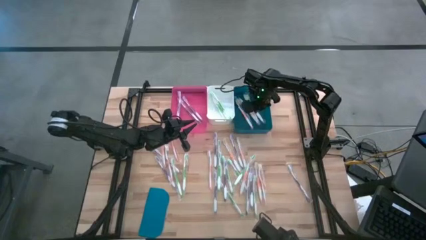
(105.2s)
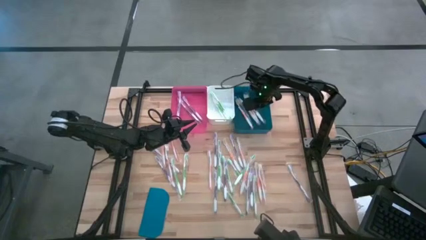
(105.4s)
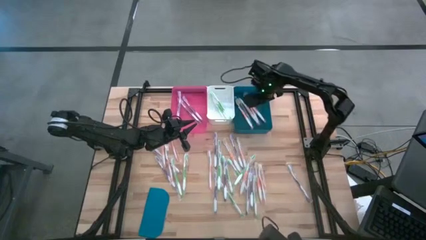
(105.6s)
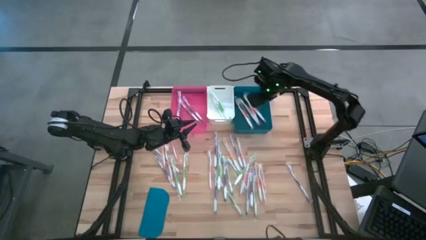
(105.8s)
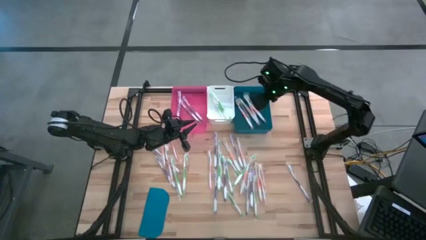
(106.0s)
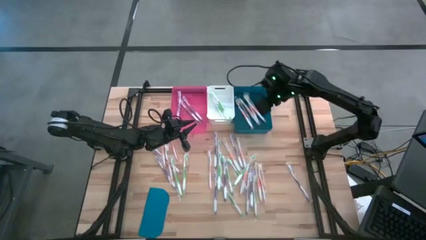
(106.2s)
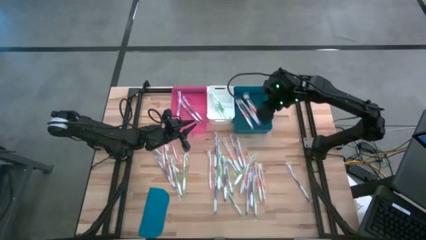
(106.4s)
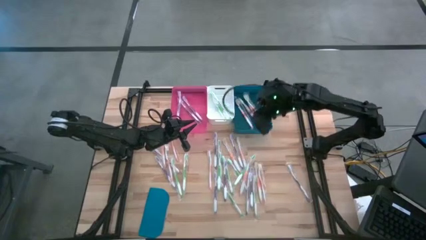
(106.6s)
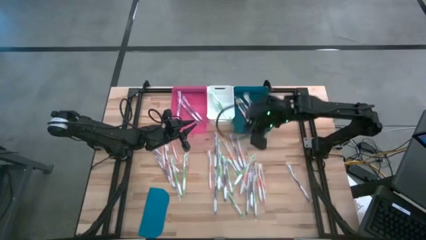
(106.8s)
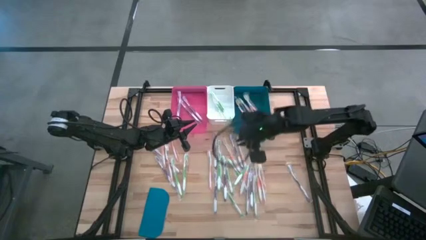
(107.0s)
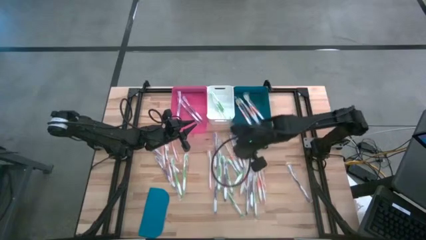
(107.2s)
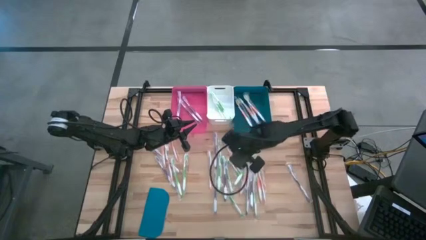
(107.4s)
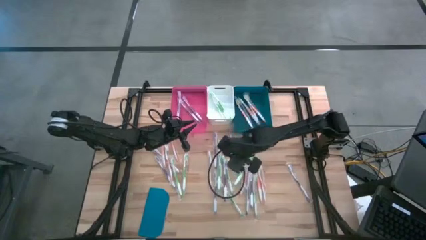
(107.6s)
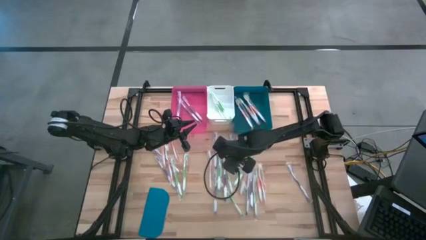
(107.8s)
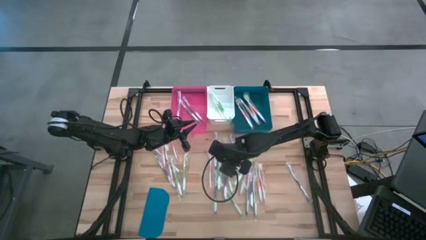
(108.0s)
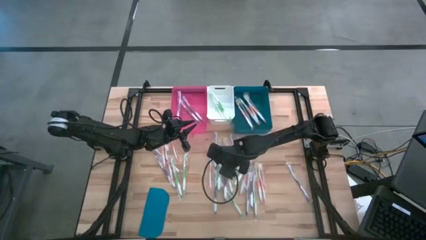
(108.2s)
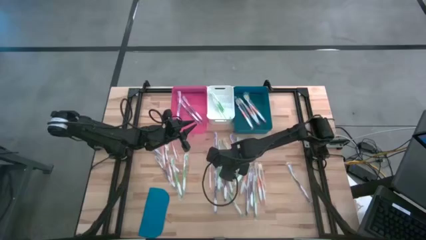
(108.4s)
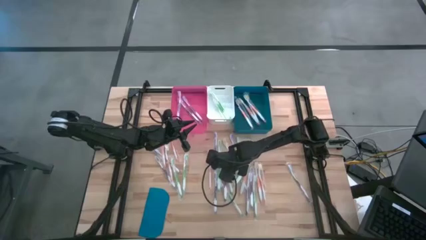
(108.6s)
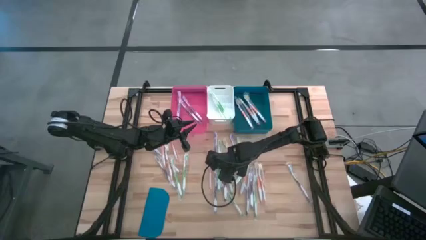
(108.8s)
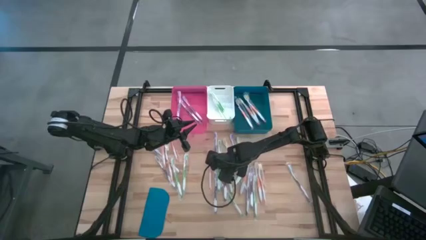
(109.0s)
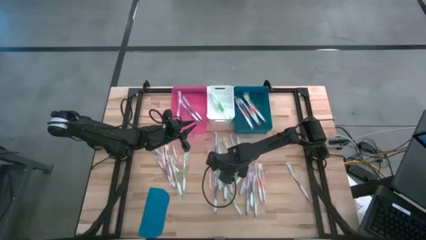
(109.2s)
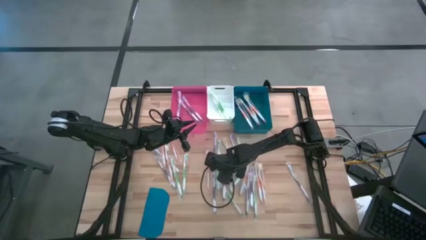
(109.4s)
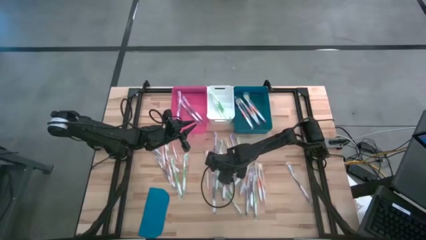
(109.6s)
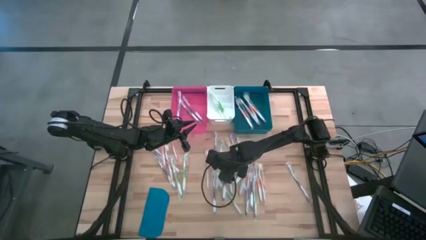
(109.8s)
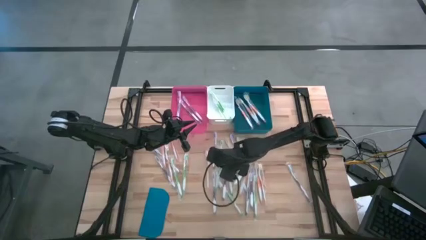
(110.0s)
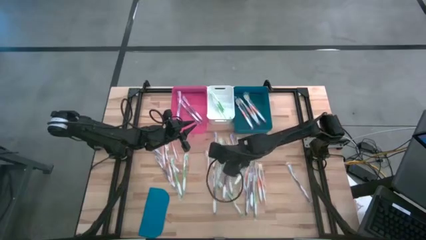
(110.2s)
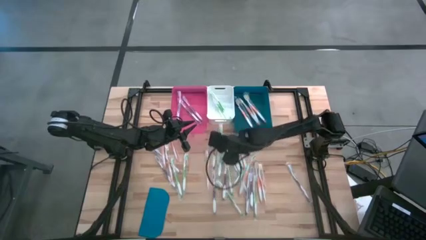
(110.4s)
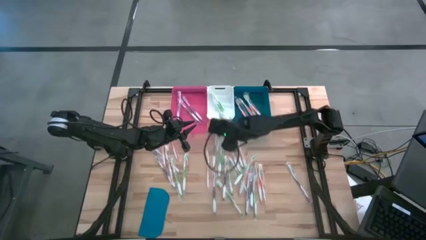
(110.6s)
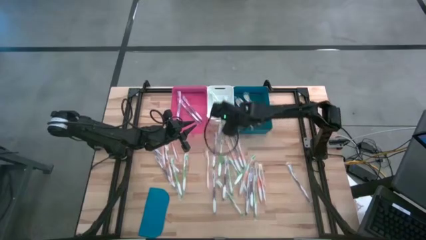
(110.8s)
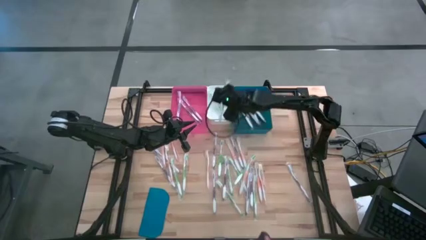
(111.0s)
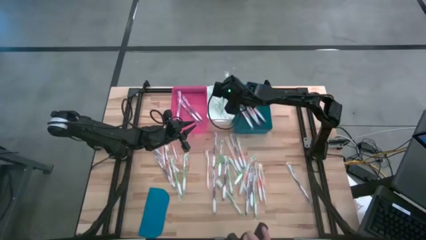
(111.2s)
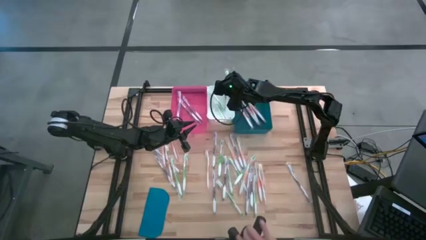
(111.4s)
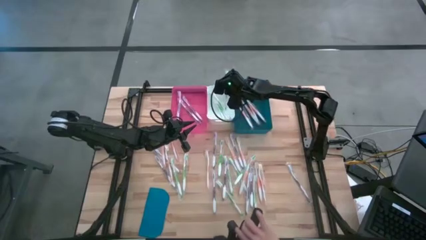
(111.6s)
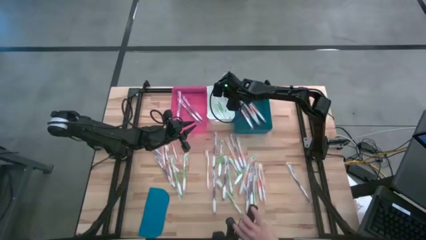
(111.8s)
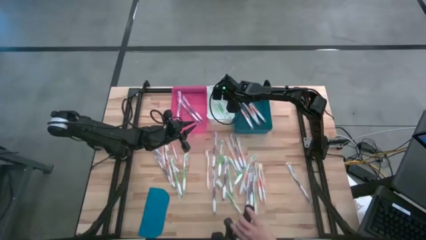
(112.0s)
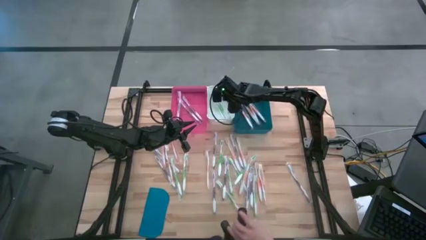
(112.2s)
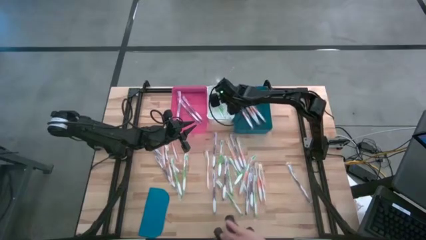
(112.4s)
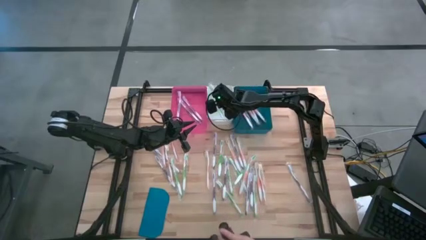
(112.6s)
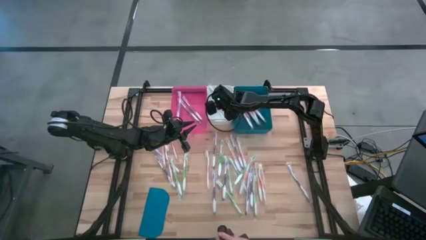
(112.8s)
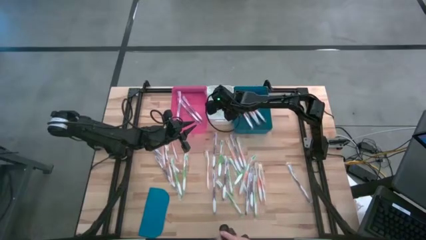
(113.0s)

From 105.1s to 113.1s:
Task: Pick & Place Toothbrushes
Put the green toothbrush into the white bin

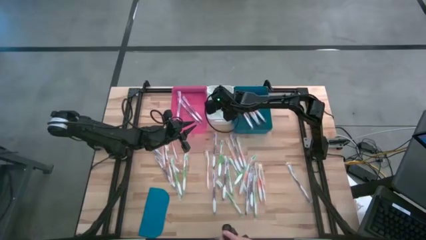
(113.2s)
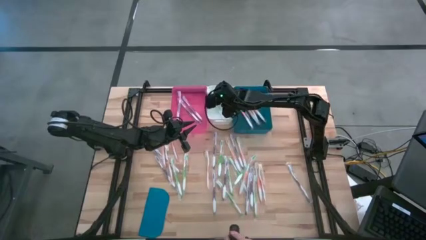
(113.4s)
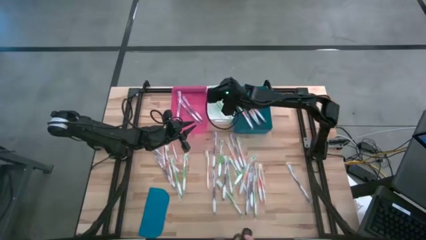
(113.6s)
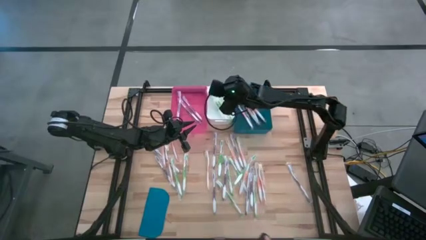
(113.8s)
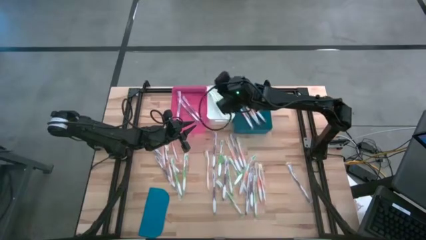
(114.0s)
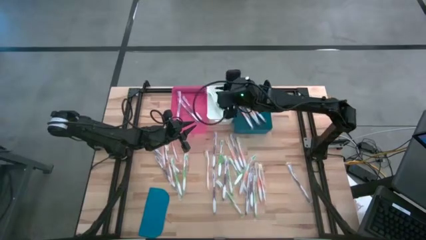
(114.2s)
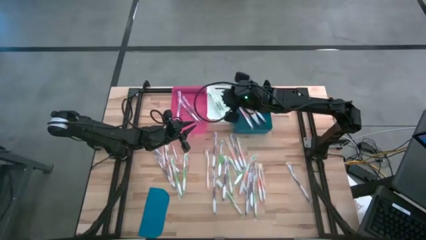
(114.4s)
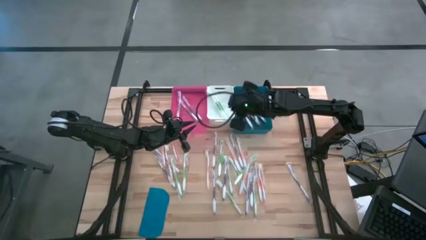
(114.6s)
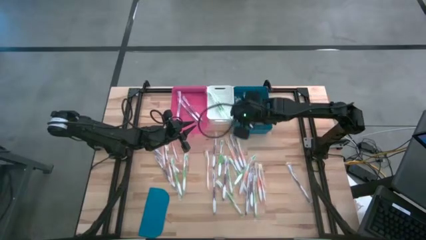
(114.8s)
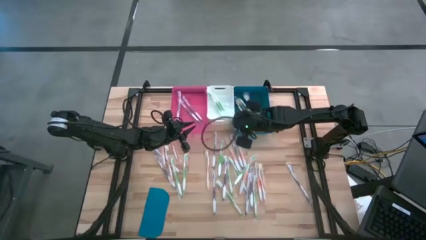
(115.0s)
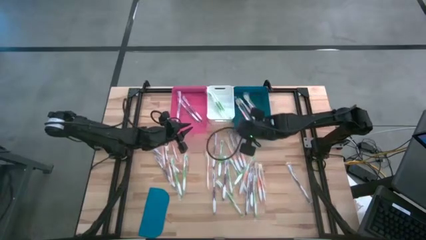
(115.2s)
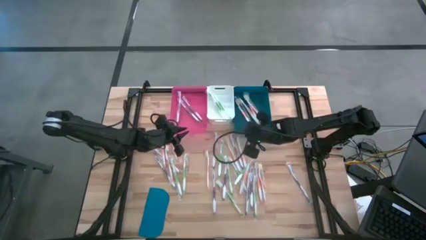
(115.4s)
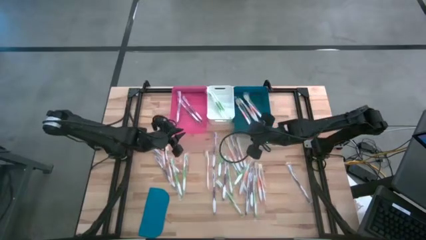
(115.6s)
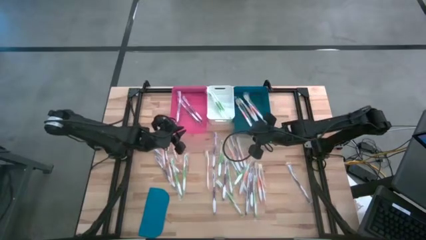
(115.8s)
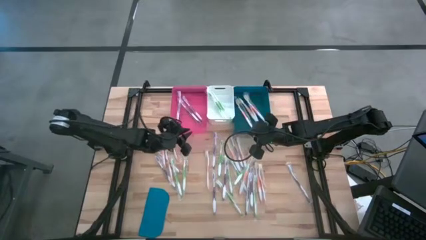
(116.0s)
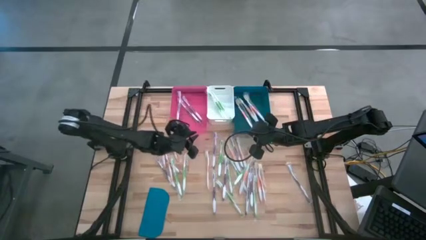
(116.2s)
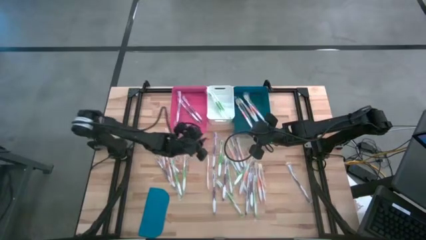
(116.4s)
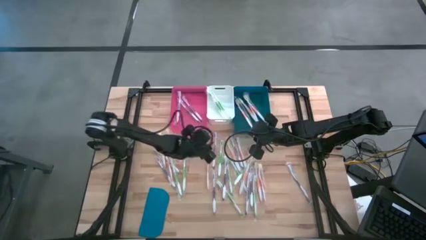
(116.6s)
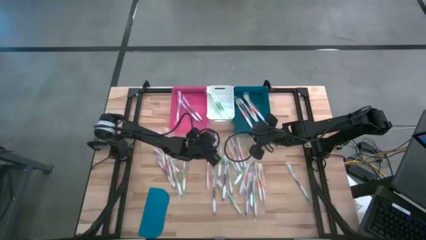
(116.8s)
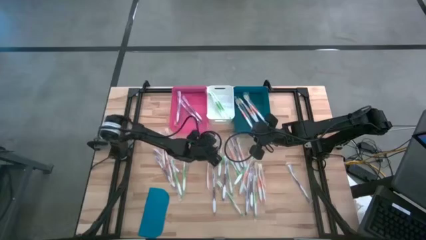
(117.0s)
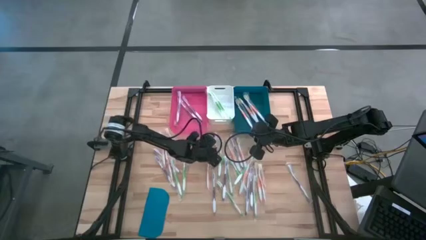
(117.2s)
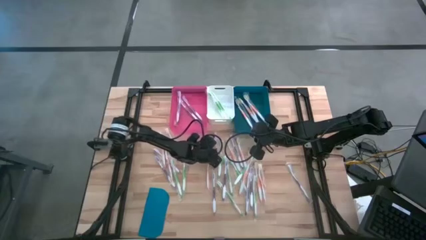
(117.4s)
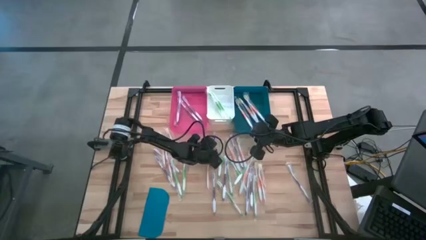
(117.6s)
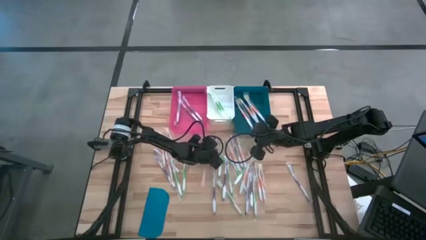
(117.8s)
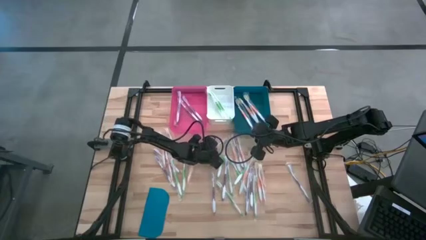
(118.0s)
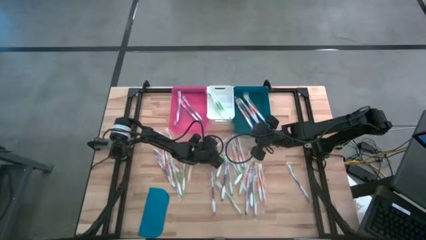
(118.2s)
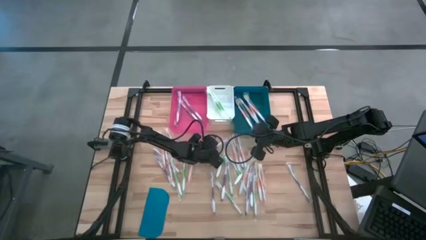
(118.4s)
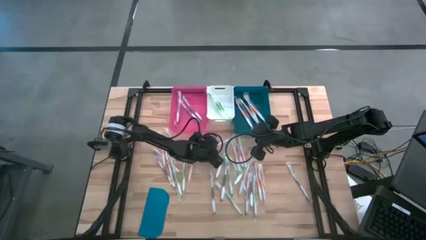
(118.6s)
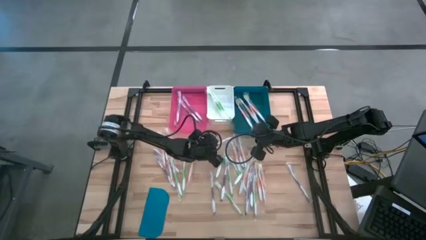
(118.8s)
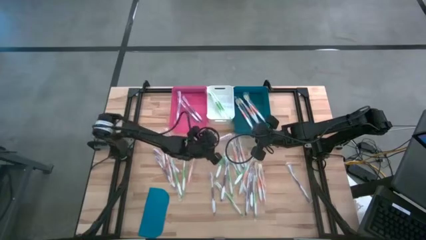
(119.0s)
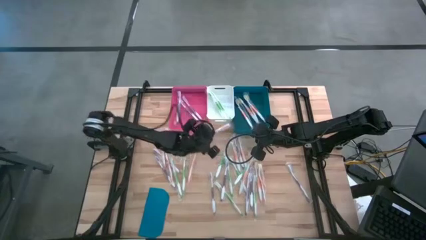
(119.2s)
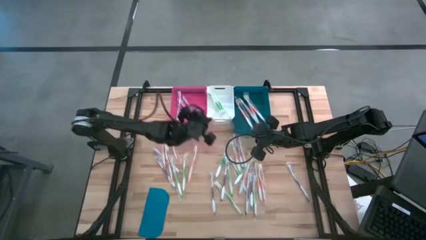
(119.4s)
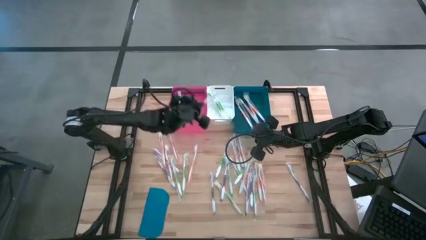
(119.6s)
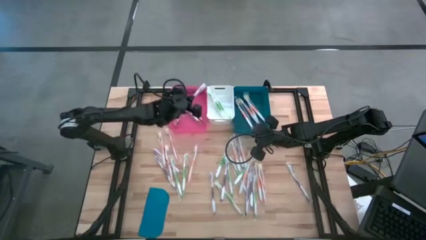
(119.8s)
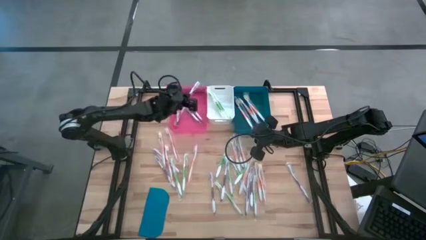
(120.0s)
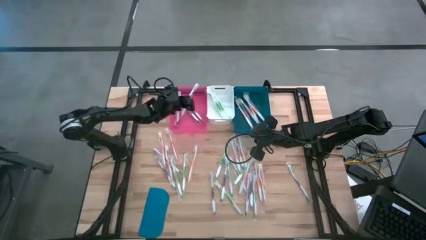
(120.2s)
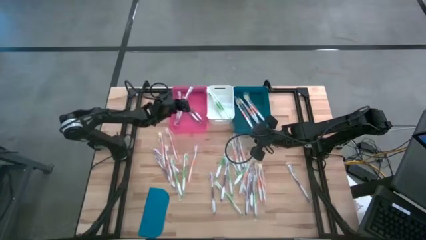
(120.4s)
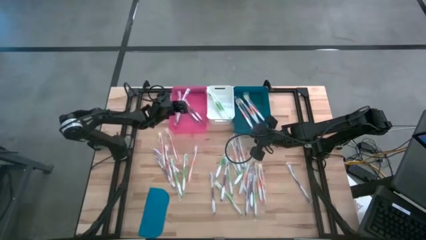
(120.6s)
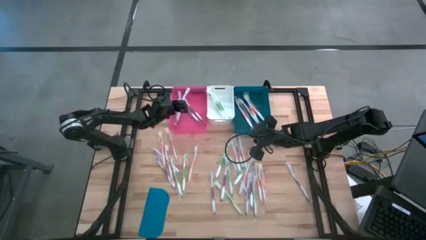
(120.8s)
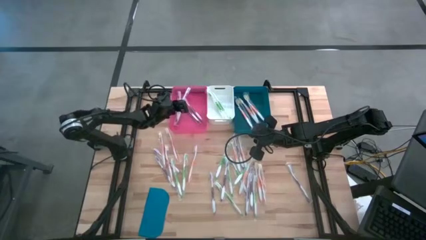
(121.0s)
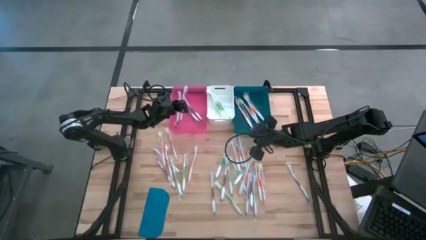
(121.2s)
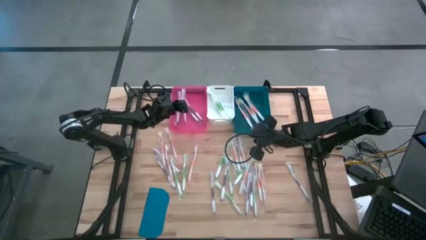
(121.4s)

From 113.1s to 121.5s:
Put the violet toothbrush into the pink bin
